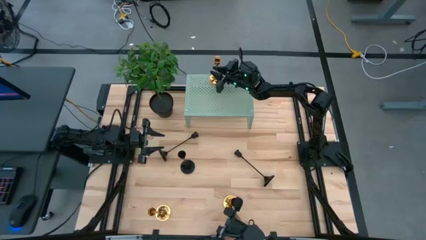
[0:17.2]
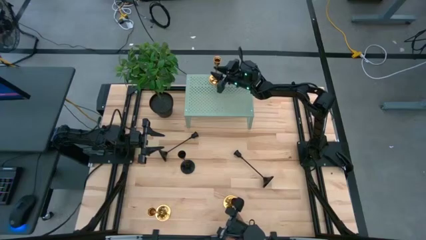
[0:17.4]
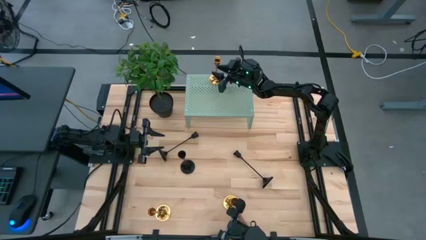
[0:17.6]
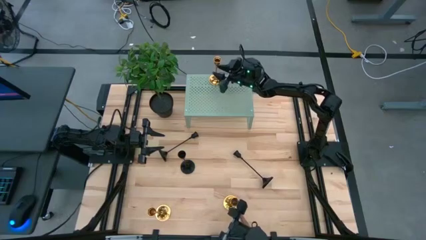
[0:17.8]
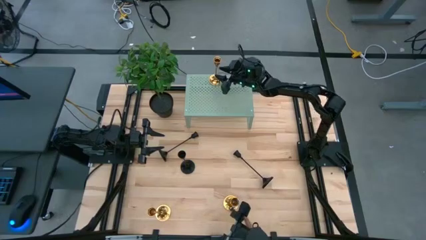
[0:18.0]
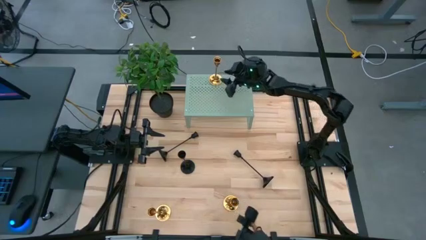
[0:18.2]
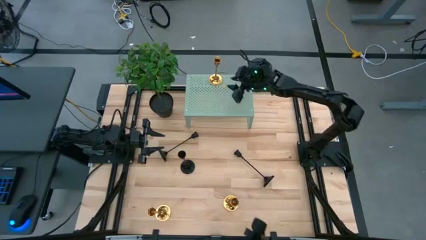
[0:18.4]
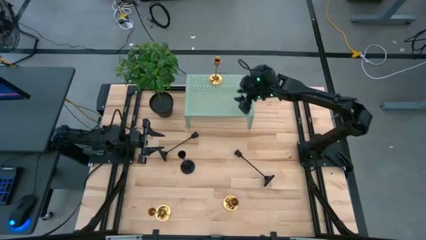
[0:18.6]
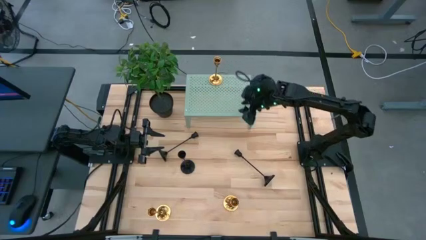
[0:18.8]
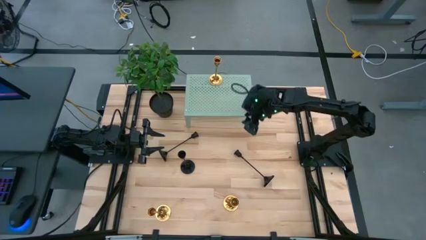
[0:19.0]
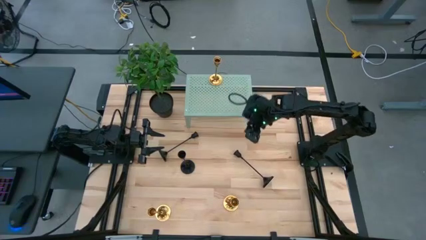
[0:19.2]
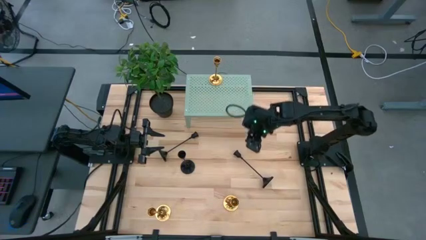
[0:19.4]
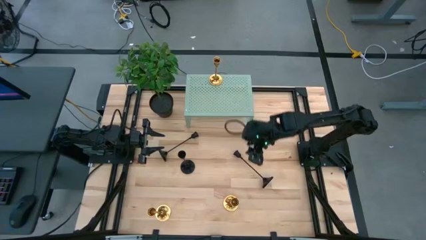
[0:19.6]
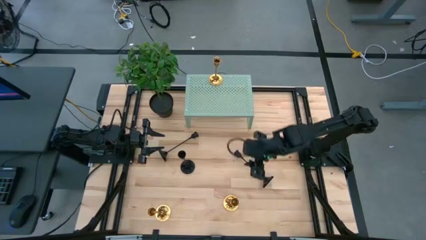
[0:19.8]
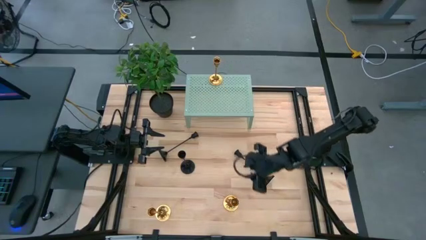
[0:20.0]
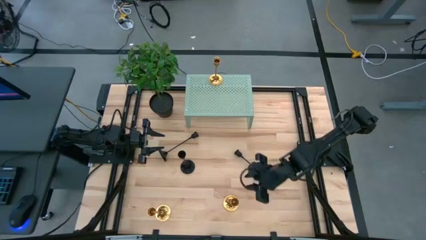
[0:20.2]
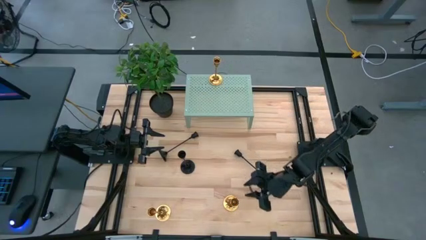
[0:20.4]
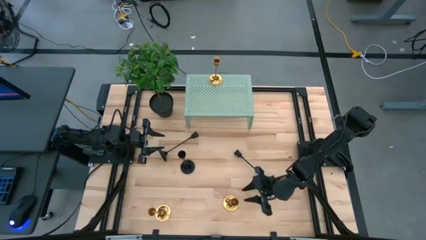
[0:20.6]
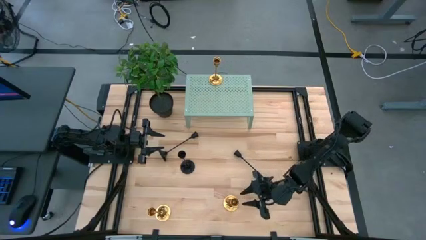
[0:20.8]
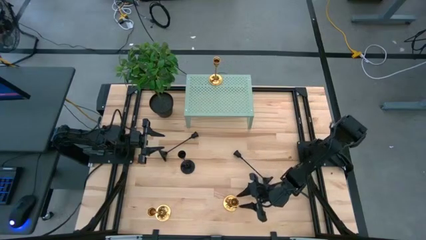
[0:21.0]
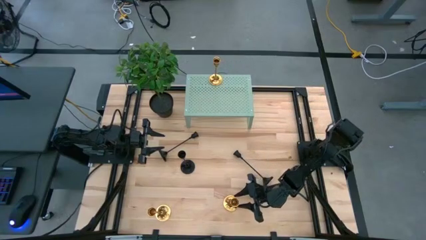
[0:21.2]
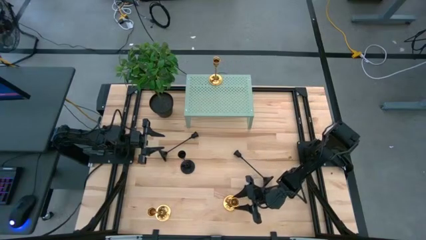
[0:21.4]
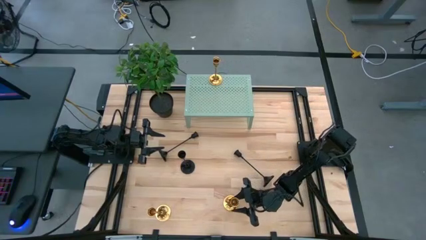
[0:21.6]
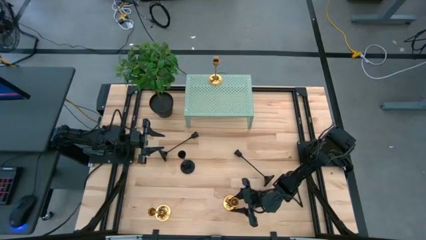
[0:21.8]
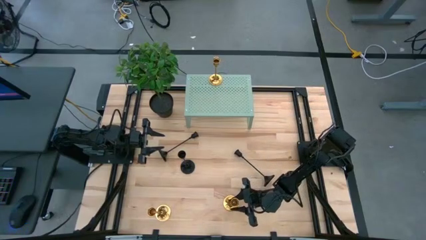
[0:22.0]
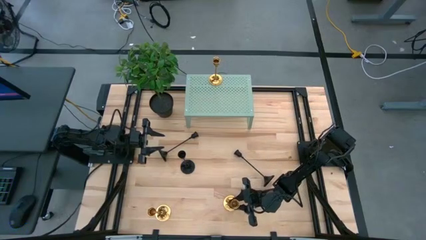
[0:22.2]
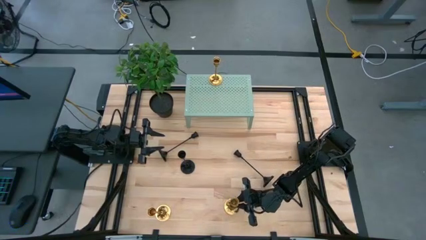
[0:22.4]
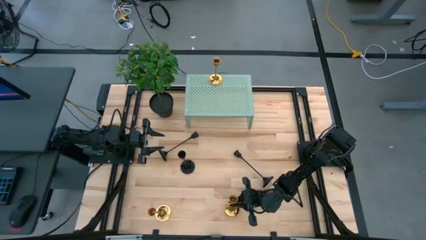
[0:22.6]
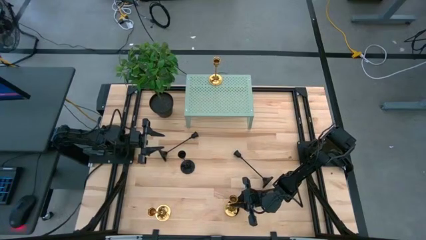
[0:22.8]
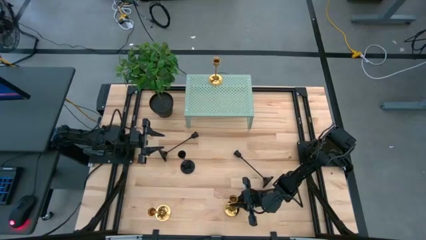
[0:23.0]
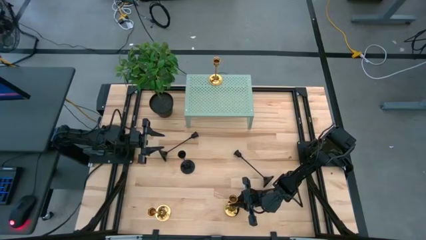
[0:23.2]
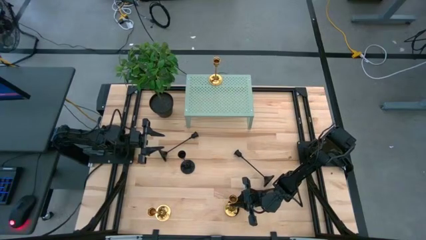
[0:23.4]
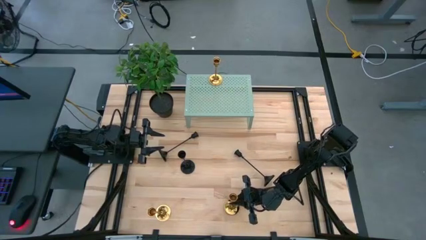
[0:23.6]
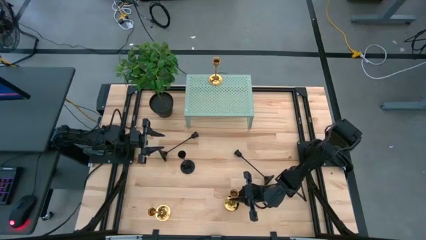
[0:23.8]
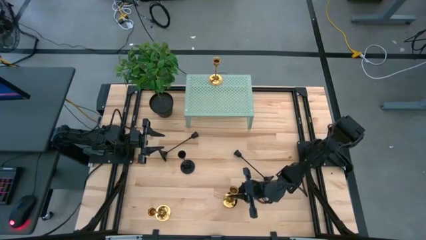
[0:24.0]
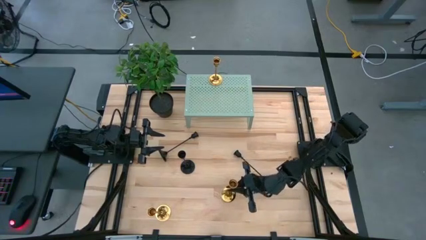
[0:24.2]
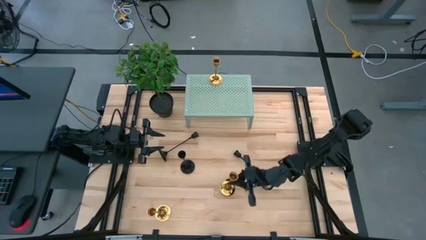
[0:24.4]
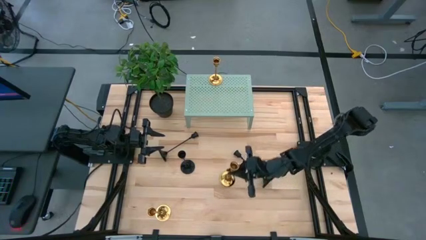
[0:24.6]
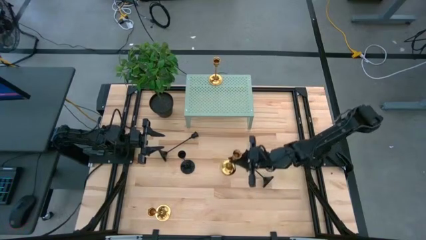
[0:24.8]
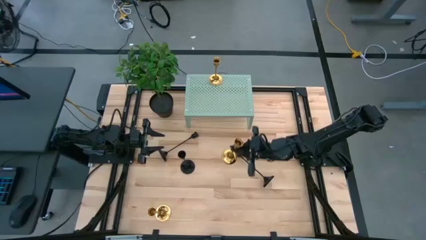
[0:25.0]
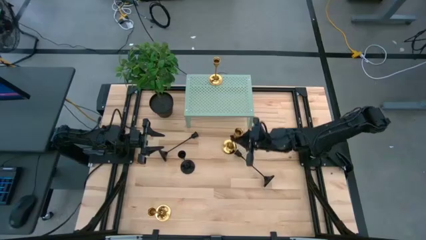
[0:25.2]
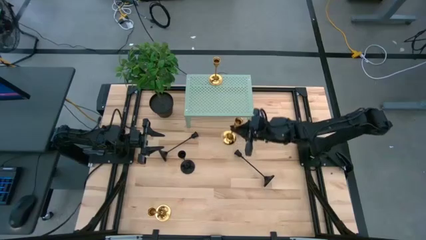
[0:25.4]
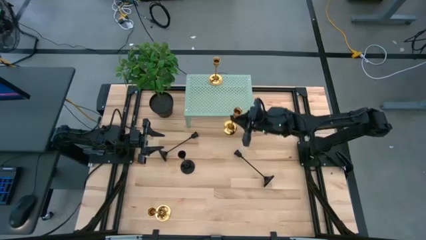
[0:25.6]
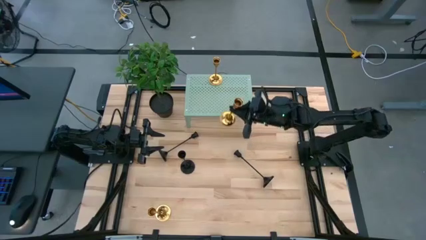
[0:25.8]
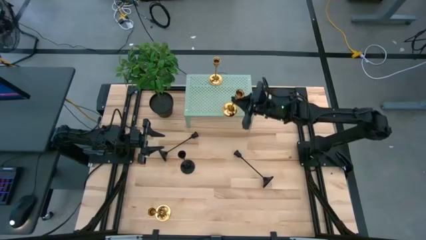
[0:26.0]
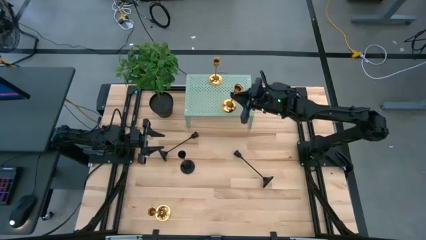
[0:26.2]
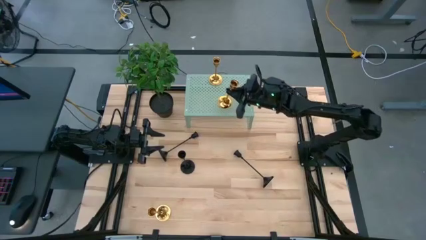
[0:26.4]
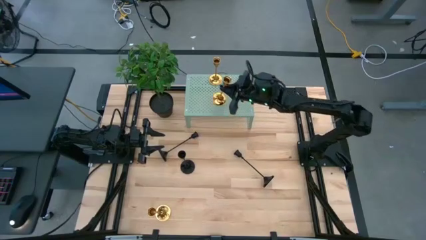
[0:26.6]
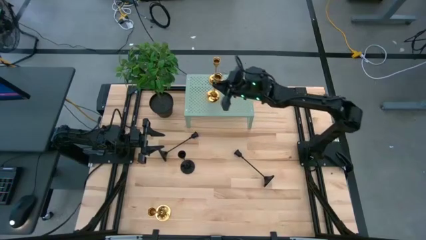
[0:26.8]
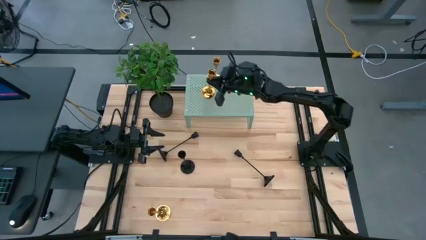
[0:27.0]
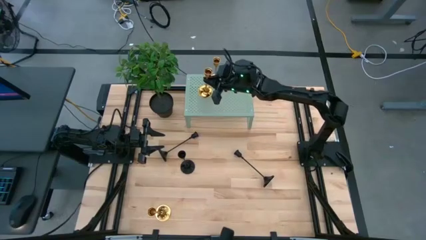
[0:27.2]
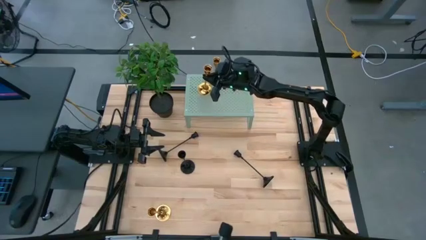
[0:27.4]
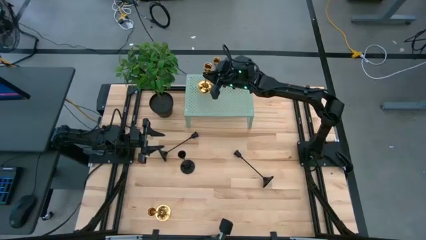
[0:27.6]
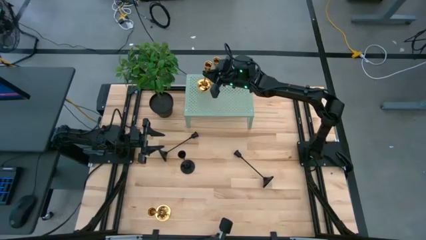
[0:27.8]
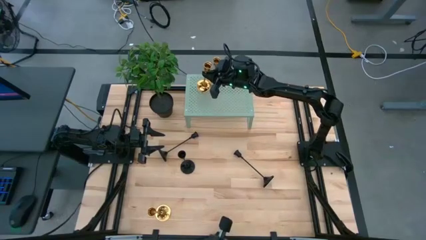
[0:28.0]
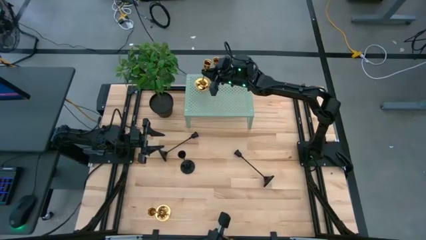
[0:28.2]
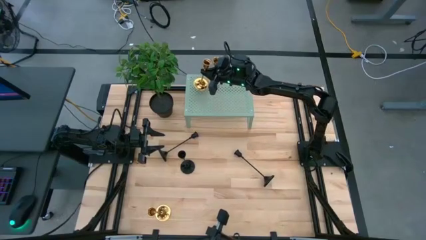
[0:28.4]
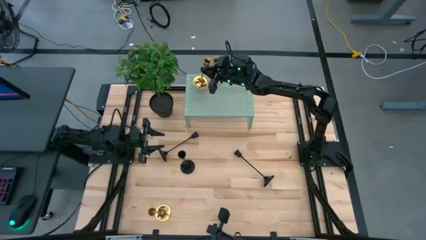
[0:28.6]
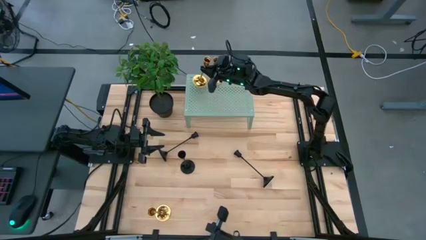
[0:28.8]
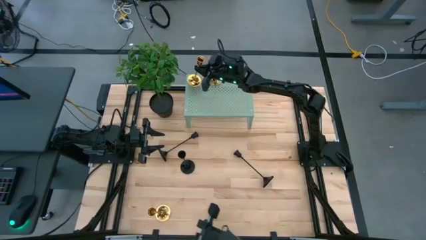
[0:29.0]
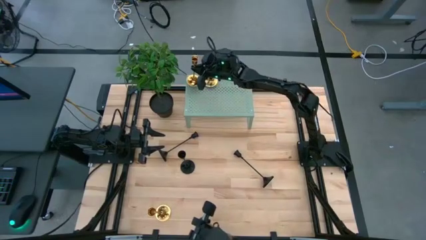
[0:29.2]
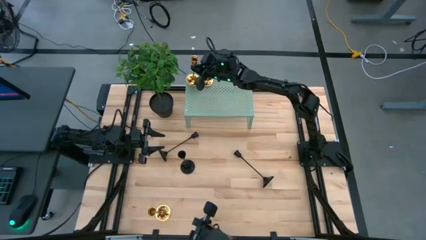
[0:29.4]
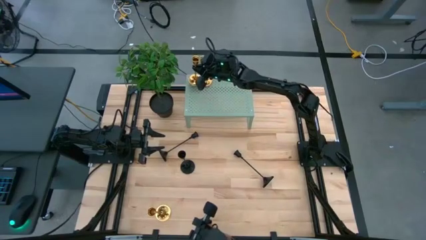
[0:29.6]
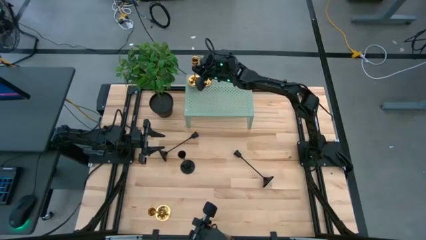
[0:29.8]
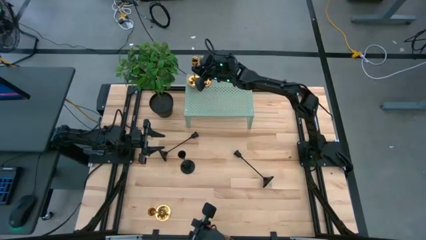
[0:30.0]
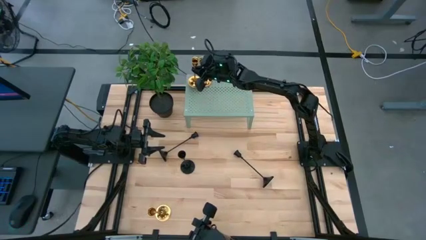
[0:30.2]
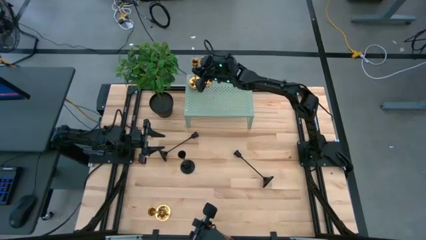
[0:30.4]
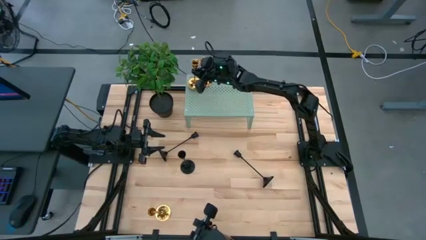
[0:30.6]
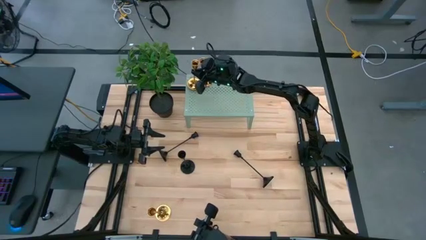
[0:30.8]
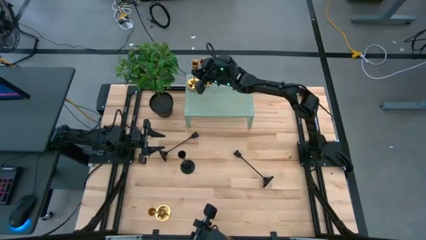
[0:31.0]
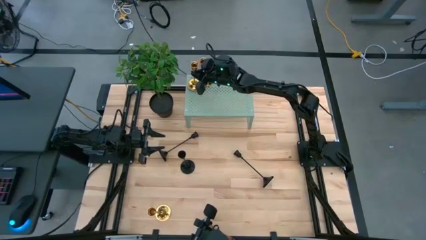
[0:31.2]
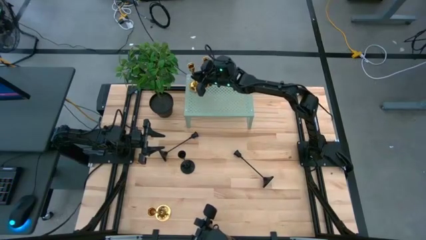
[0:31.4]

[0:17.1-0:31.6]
Task: Pick & Place candle stick holders
Put the right gold candle holder on the shelf

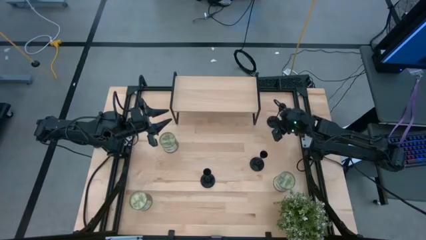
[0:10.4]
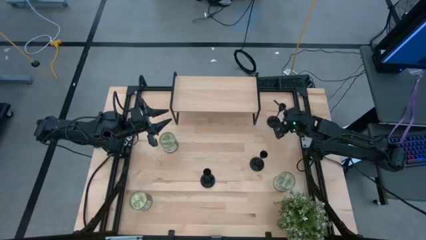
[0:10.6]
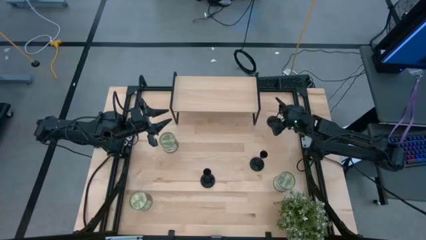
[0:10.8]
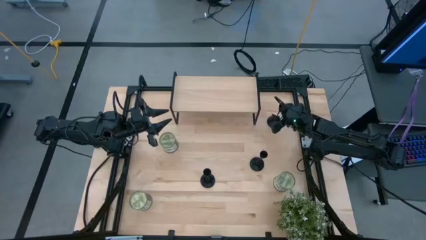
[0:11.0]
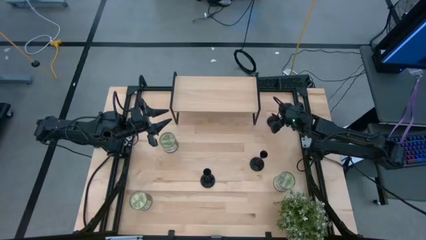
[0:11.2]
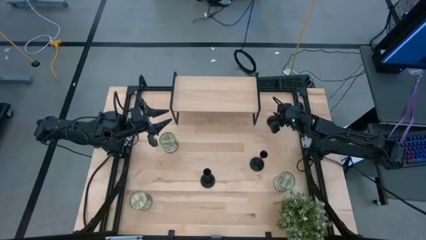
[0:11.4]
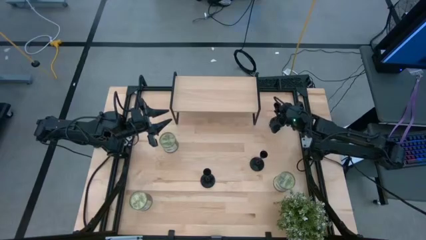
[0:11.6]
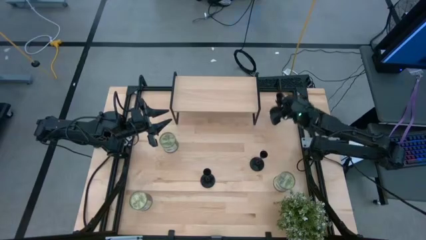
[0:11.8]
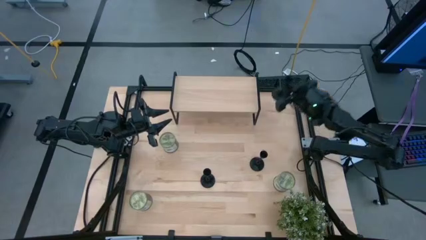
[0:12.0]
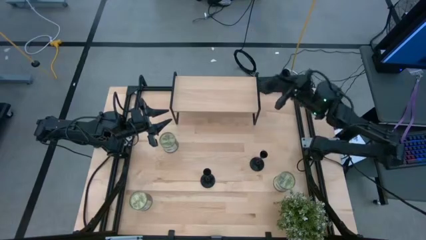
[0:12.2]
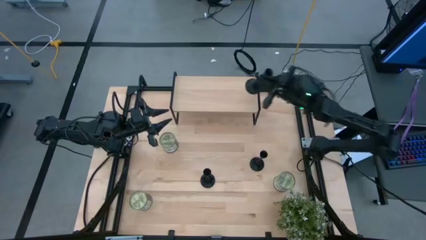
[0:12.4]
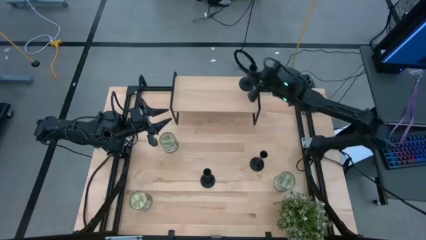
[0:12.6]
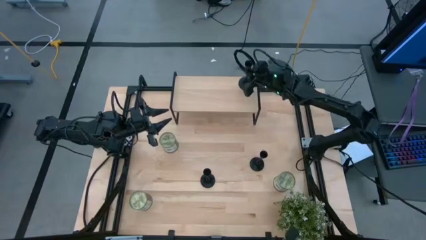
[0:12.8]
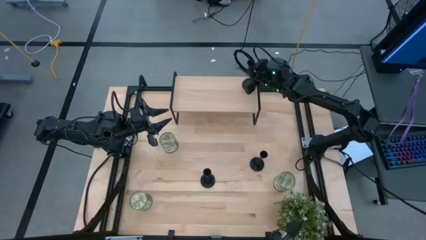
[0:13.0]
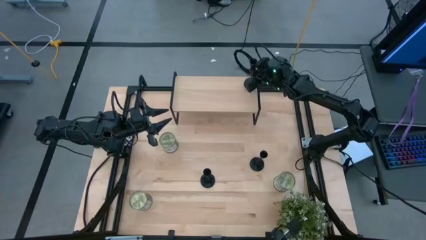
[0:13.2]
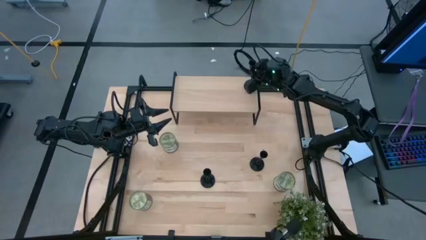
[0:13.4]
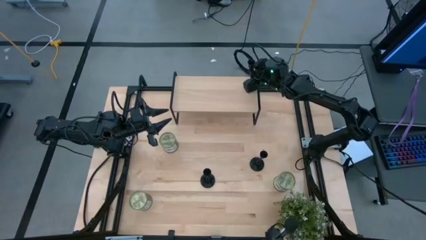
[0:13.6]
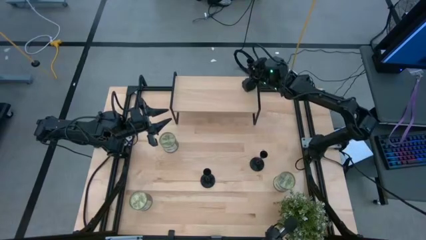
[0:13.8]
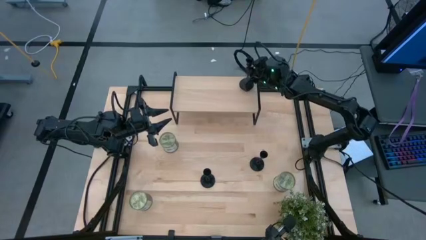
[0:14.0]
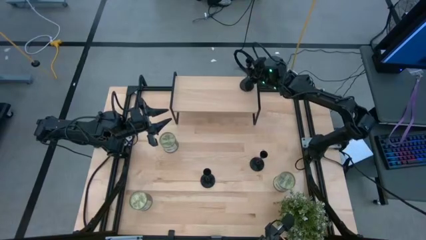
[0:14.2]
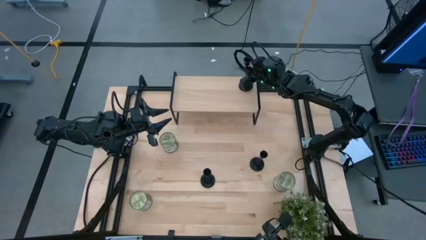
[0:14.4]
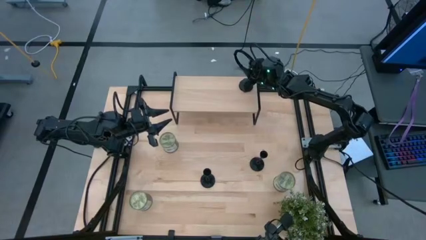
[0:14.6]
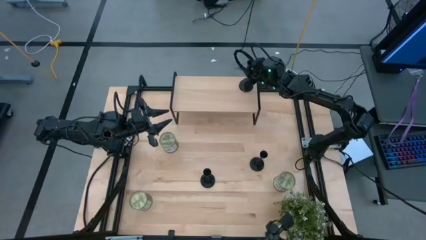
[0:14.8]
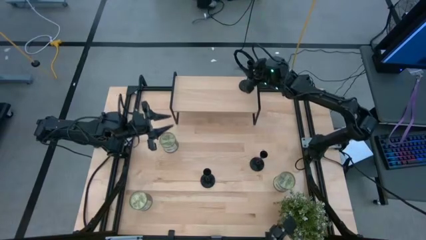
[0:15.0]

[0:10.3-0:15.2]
Task: Pick & Place candle stick holders
Put the top black candle holder on the shelf
